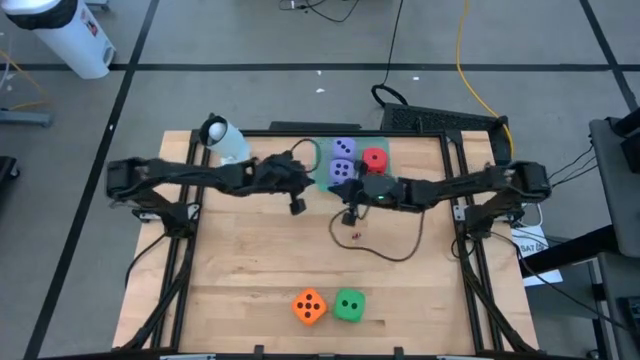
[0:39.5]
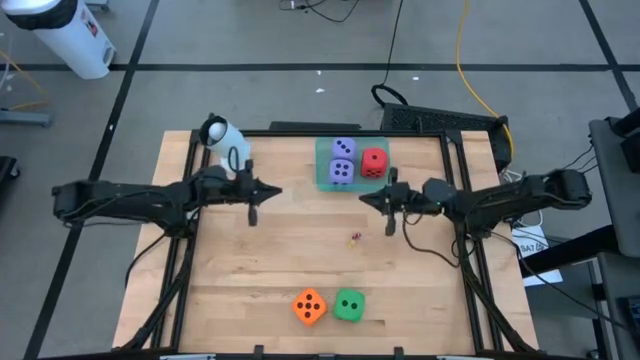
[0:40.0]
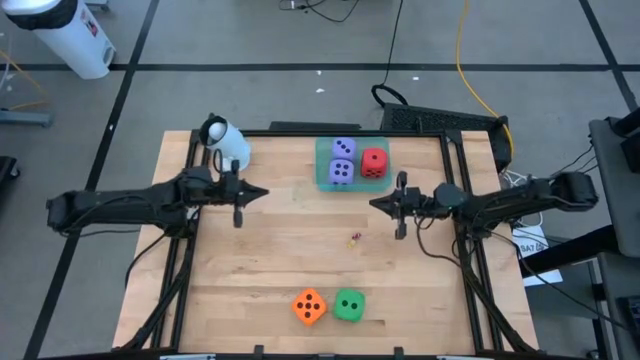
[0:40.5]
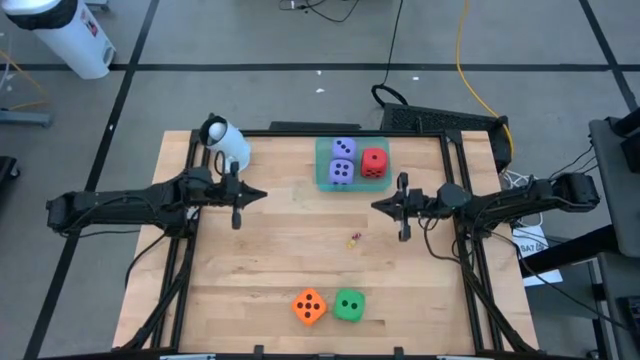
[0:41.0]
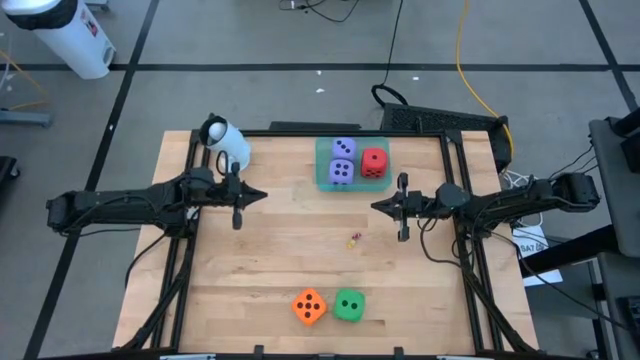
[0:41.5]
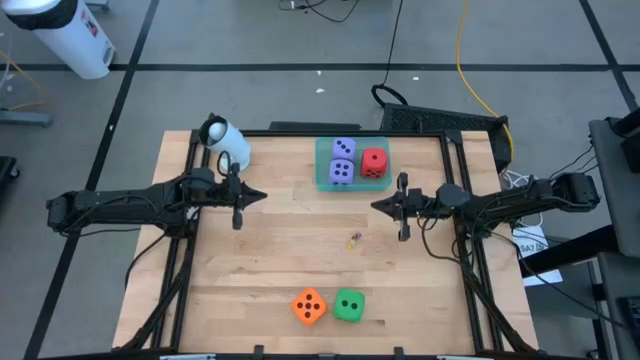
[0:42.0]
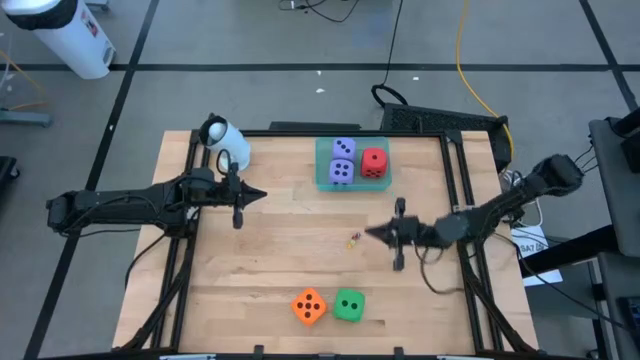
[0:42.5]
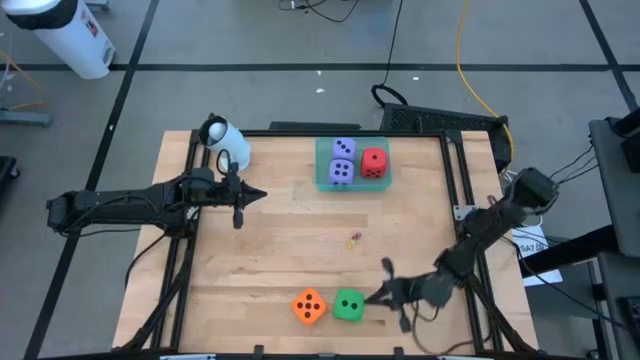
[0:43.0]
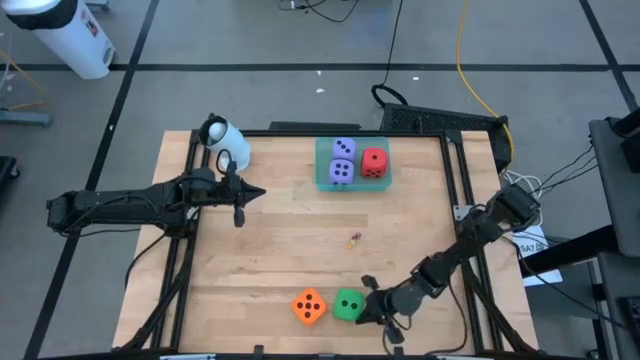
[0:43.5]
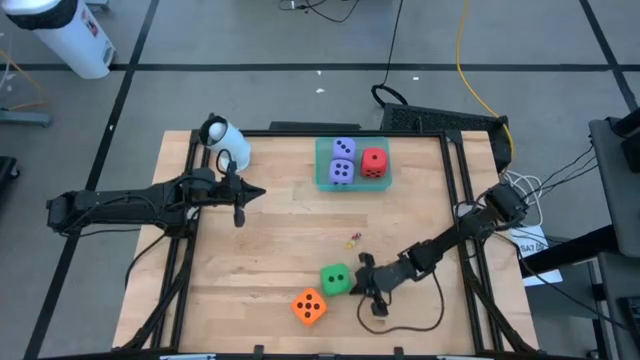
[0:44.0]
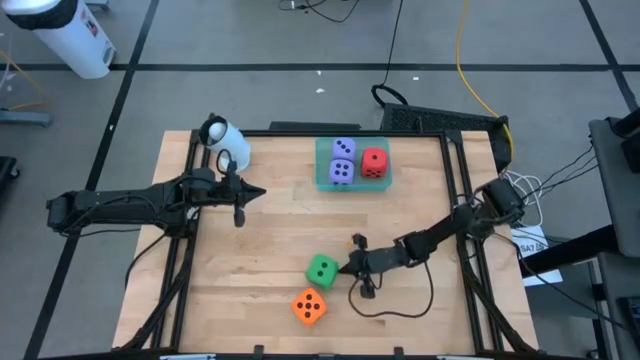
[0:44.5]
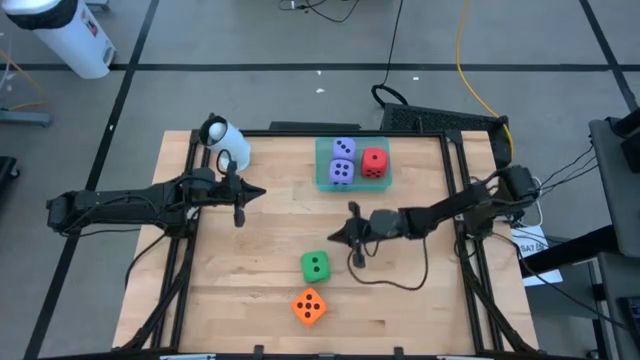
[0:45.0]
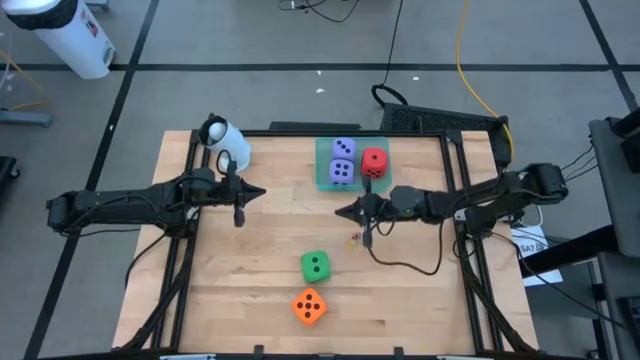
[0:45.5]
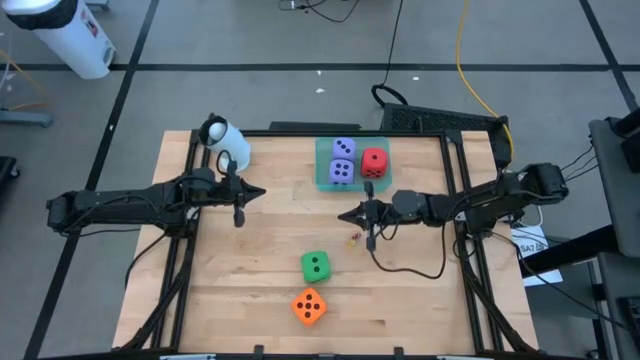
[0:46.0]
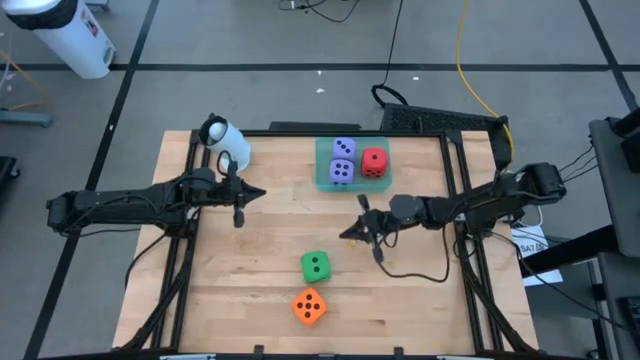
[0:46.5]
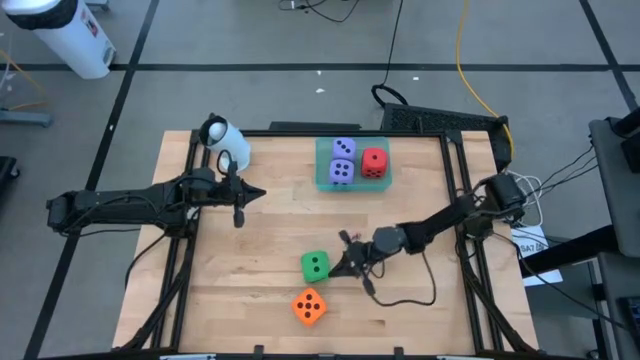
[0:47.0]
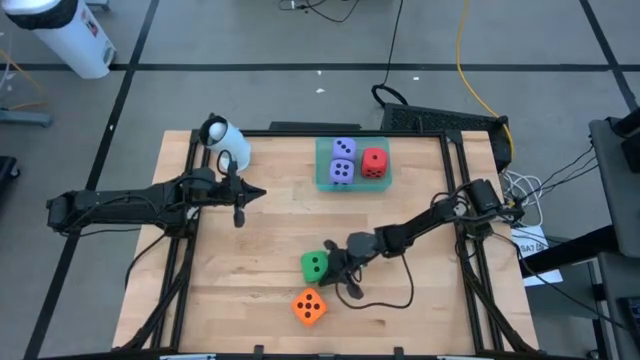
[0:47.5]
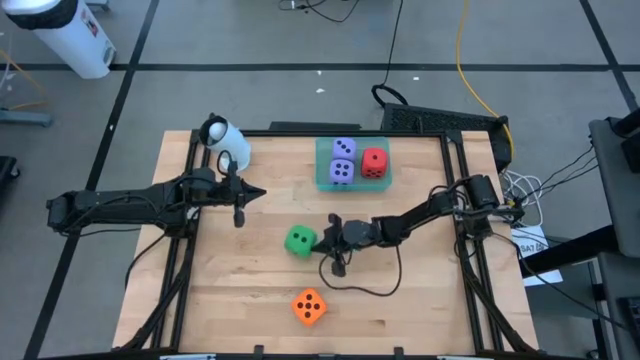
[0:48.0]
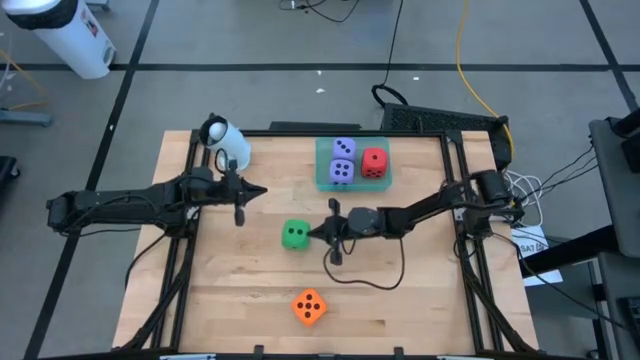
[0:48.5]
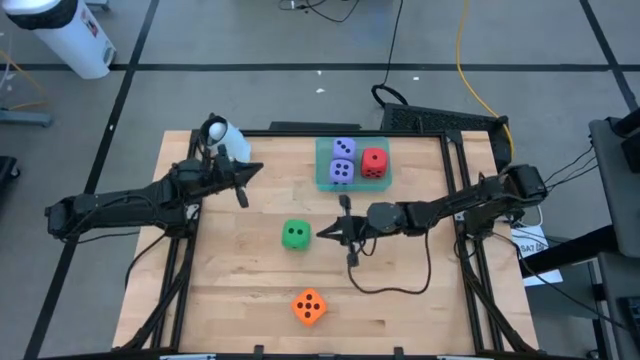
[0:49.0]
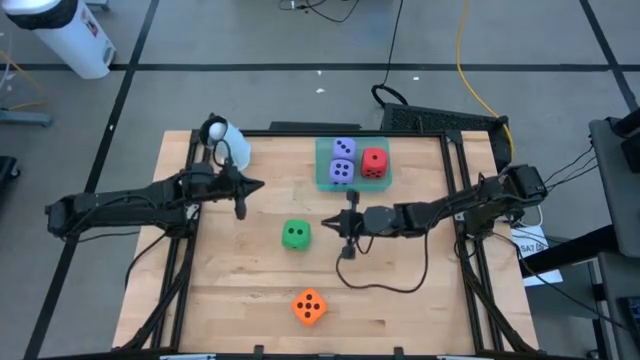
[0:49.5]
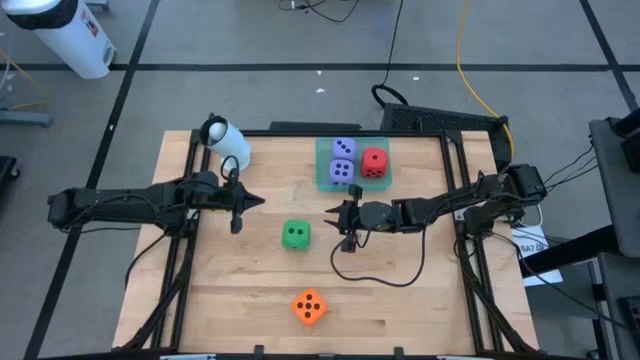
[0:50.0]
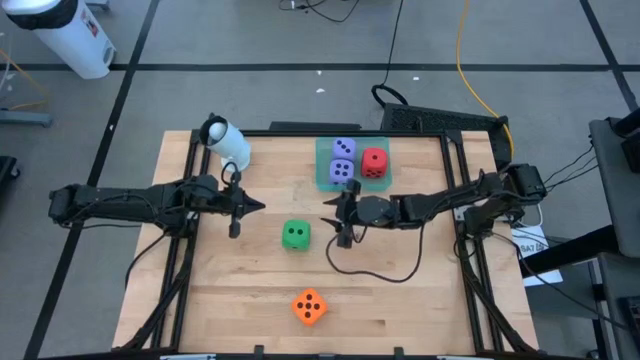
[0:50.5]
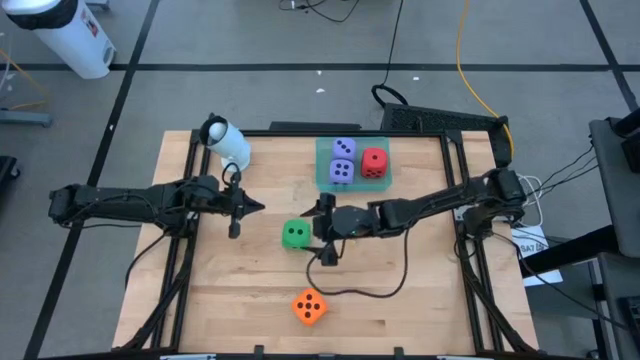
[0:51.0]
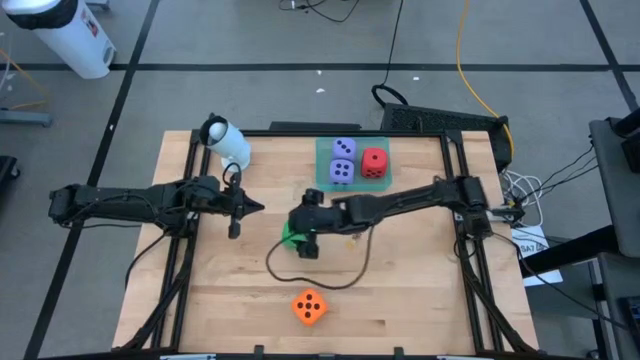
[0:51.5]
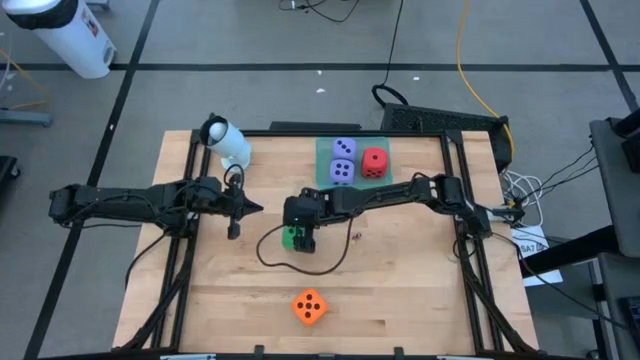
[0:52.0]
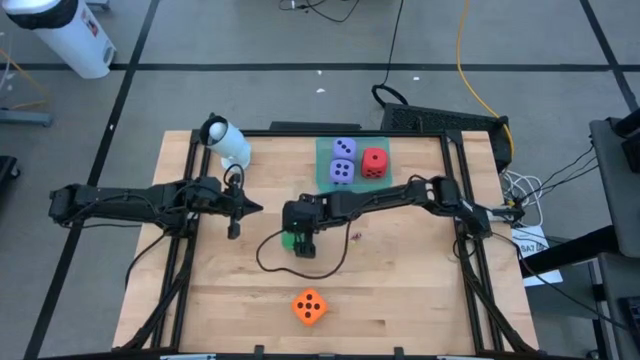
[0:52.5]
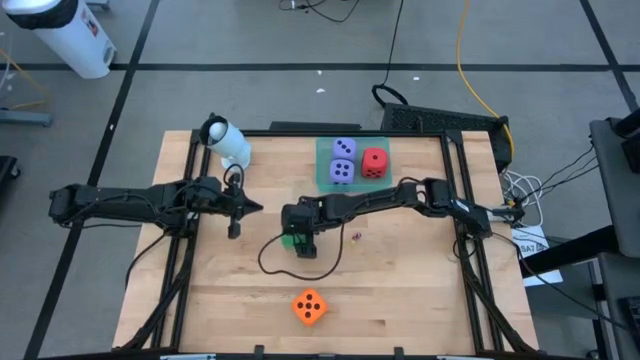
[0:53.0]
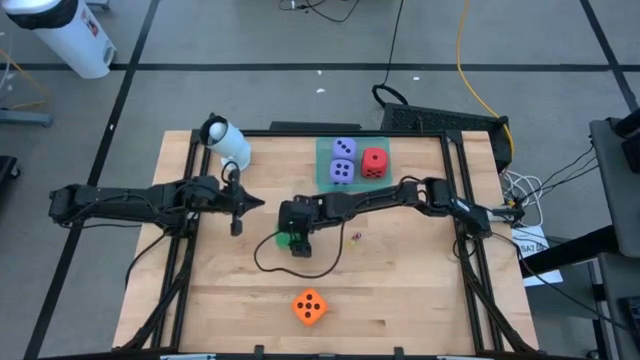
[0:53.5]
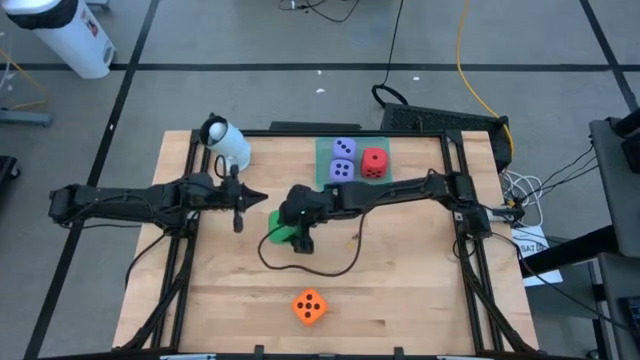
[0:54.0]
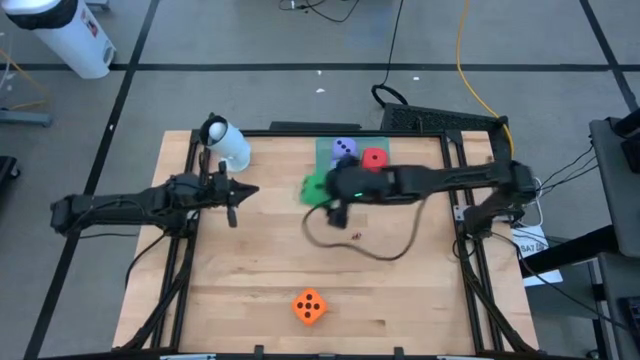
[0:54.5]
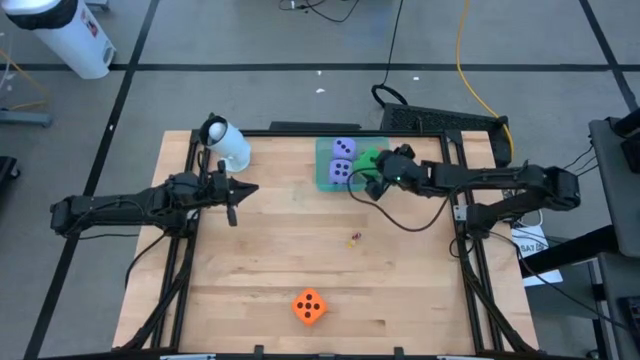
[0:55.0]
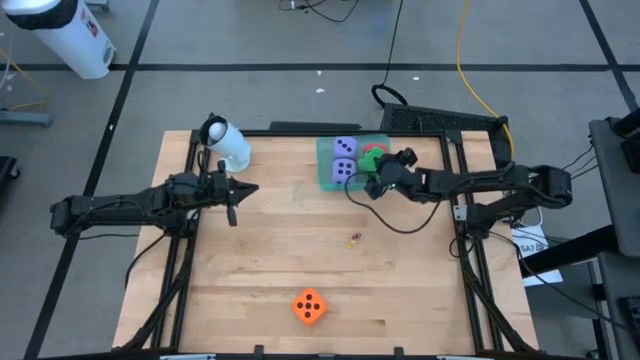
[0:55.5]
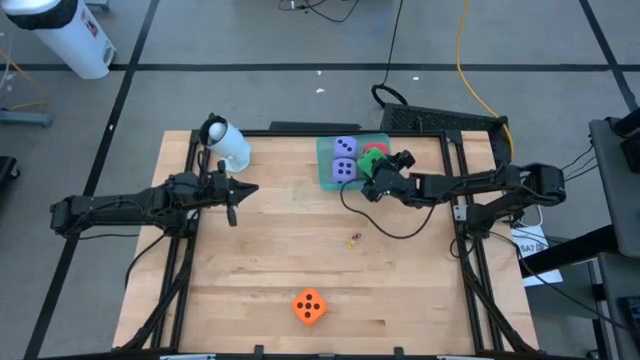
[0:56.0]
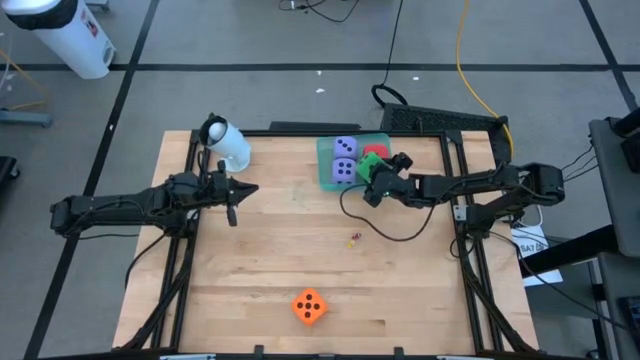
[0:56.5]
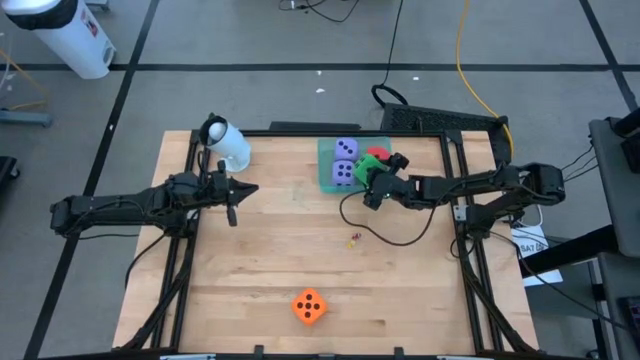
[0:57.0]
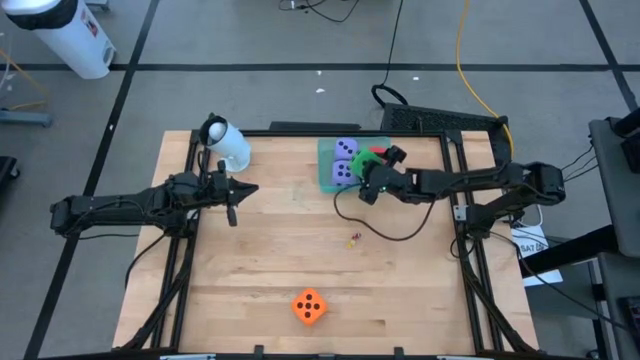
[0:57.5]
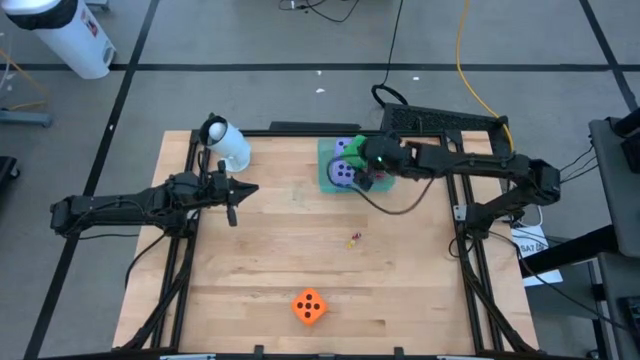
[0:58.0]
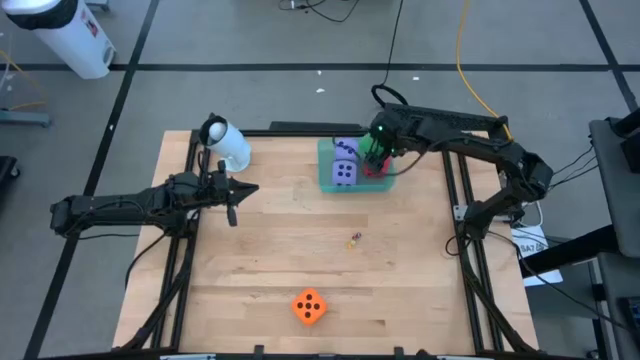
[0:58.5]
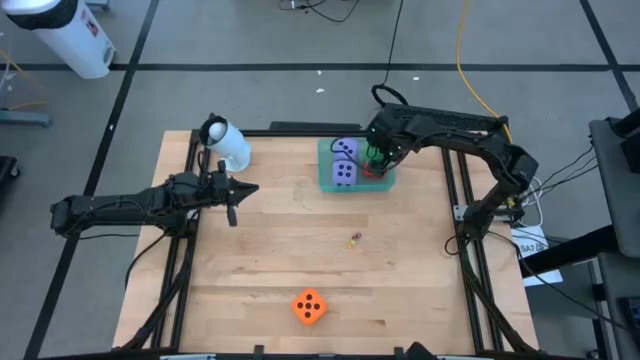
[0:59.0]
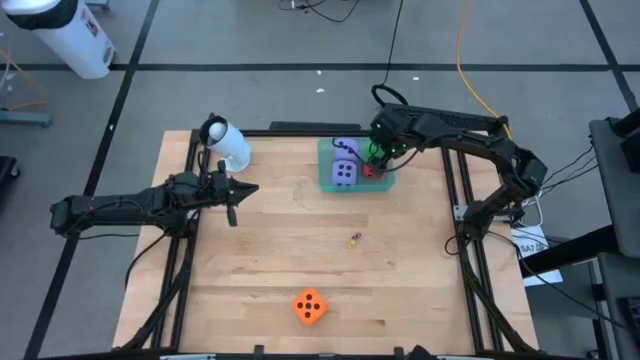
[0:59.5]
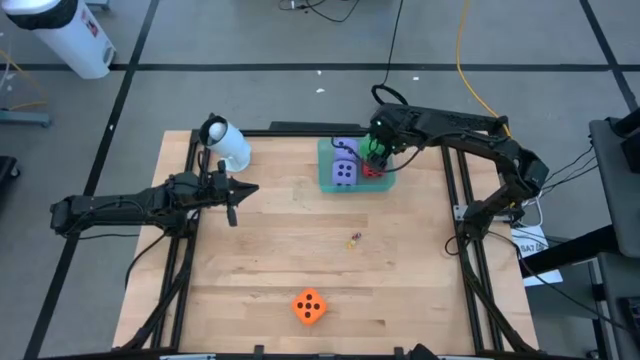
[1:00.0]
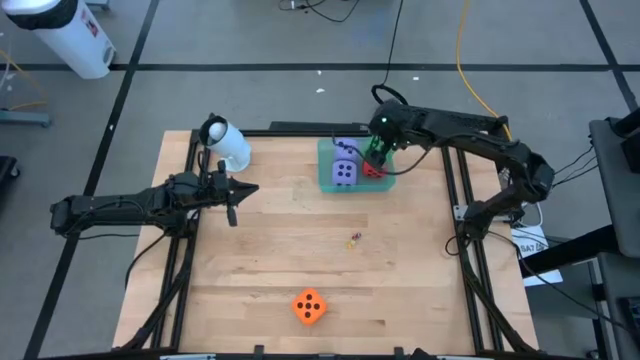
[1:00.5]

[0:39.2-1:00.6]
Task: Pick & Place Dice
Put the large green die into the bin
